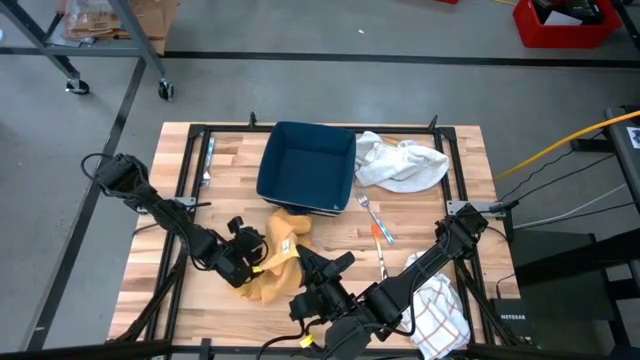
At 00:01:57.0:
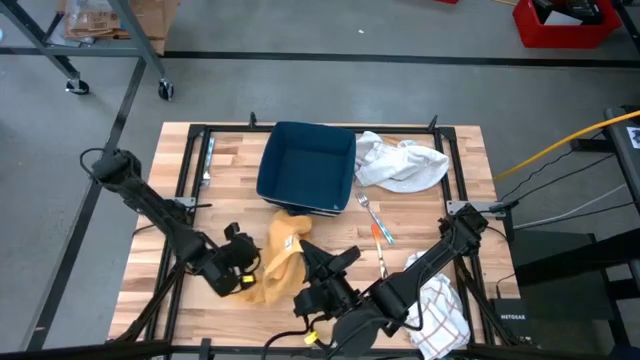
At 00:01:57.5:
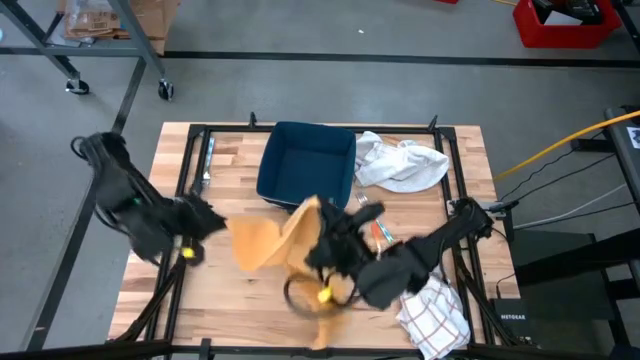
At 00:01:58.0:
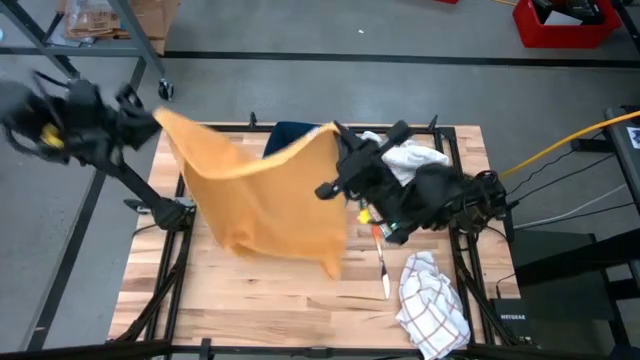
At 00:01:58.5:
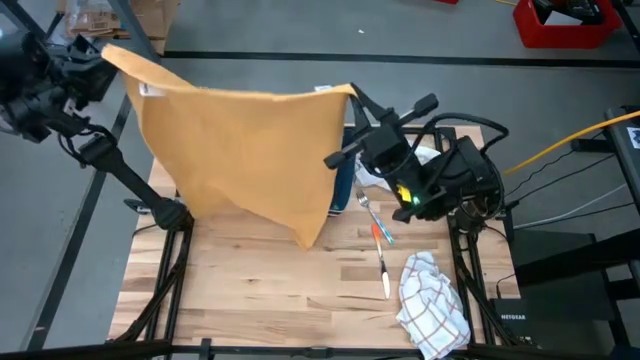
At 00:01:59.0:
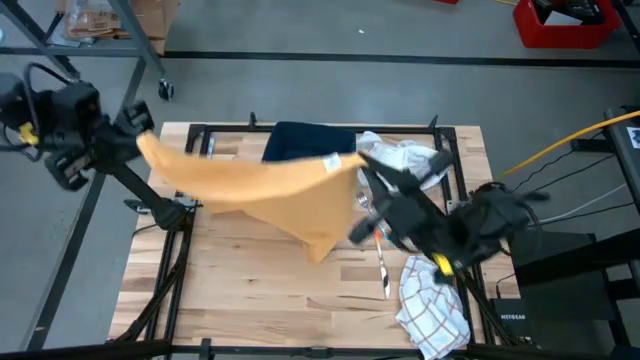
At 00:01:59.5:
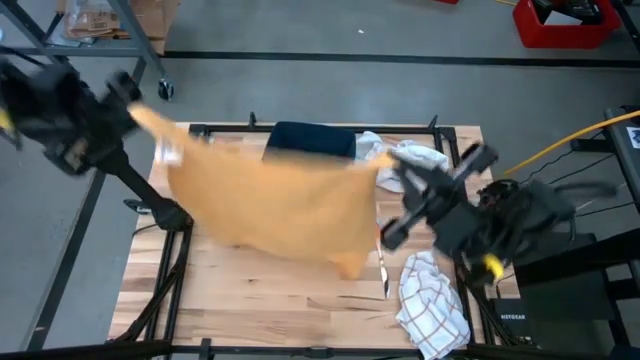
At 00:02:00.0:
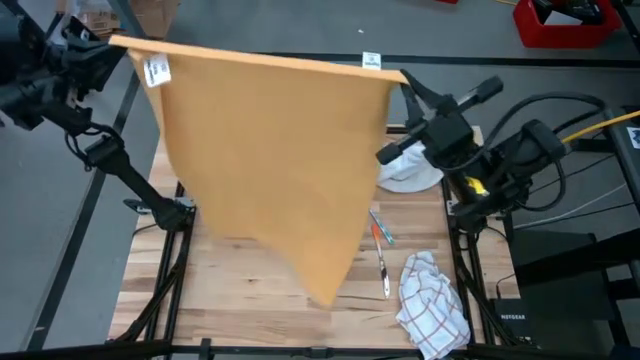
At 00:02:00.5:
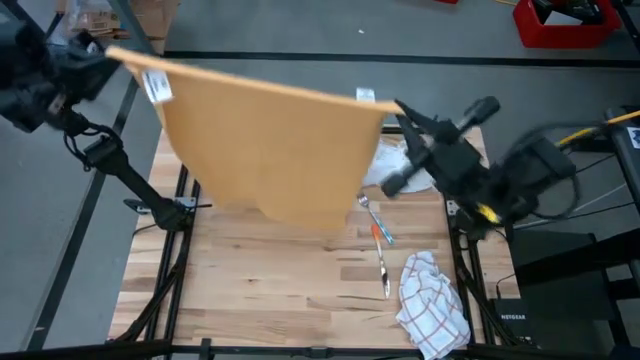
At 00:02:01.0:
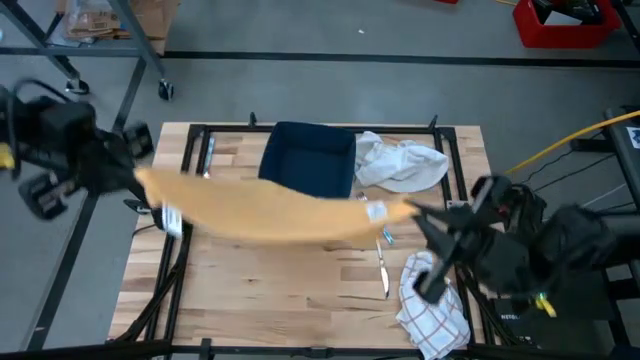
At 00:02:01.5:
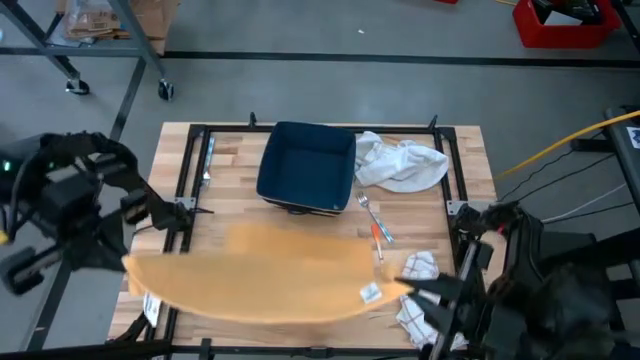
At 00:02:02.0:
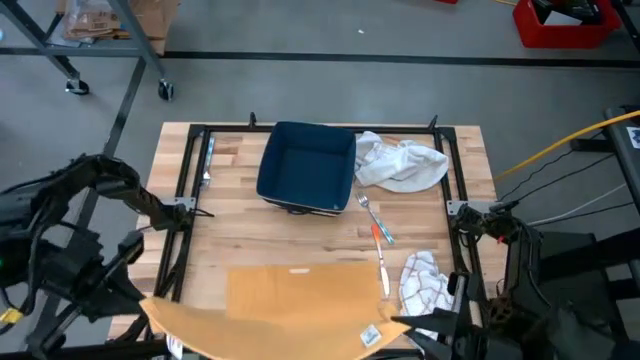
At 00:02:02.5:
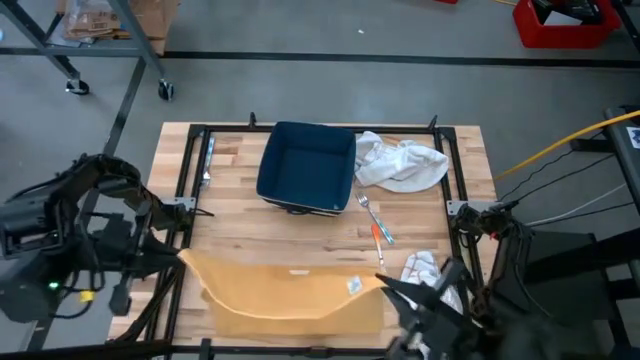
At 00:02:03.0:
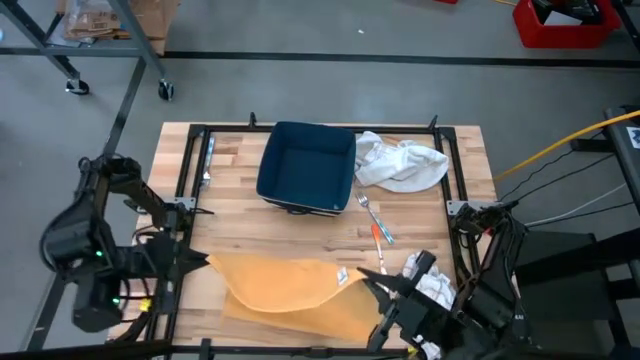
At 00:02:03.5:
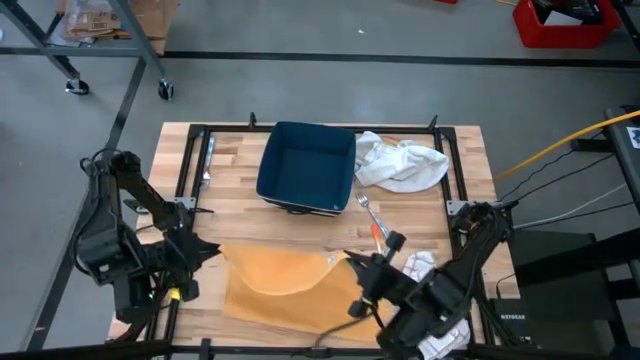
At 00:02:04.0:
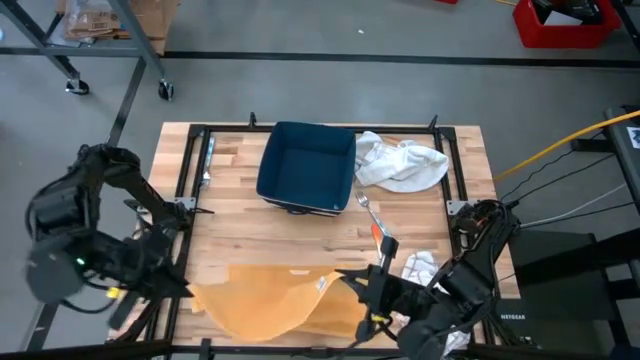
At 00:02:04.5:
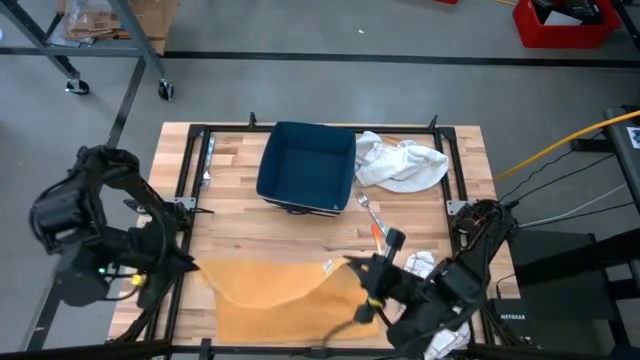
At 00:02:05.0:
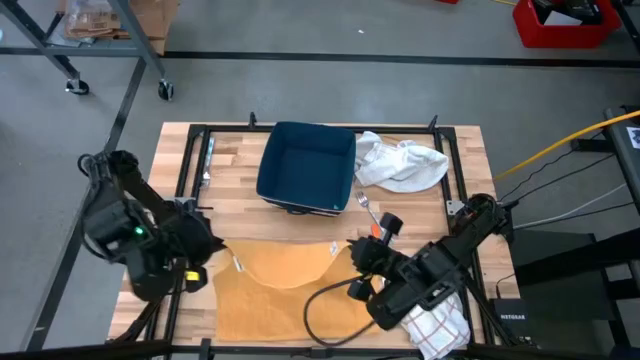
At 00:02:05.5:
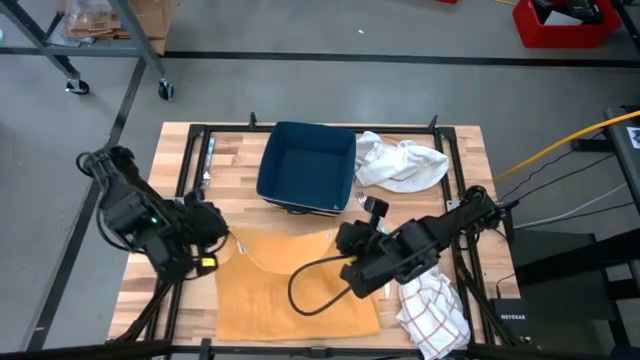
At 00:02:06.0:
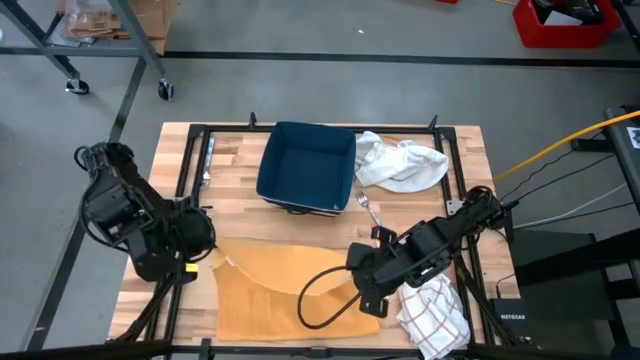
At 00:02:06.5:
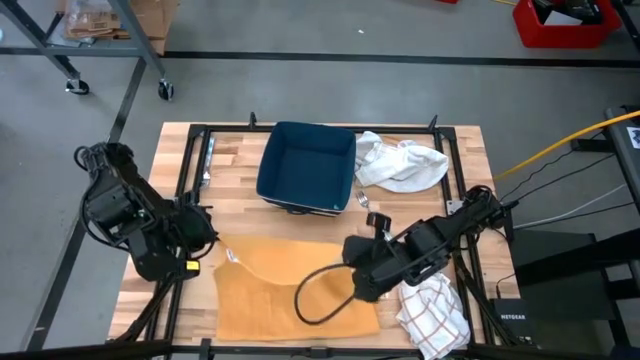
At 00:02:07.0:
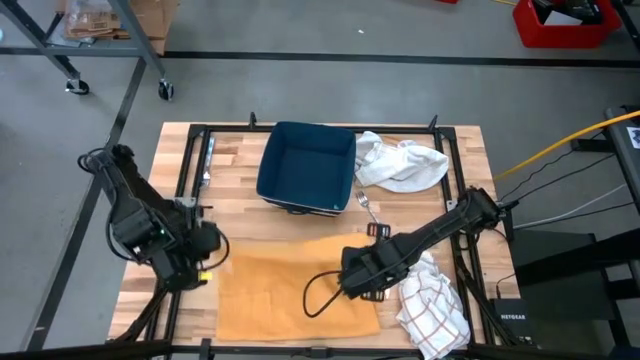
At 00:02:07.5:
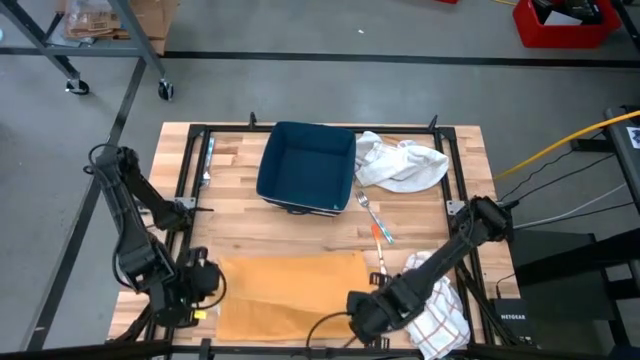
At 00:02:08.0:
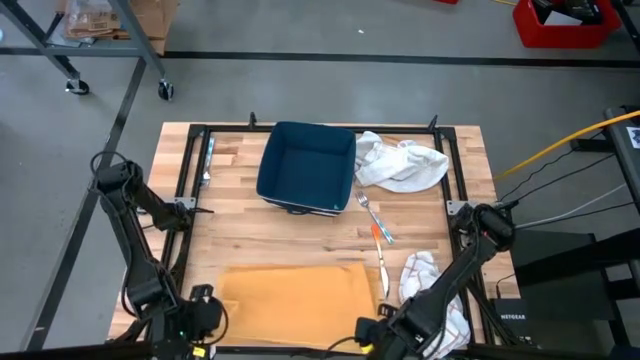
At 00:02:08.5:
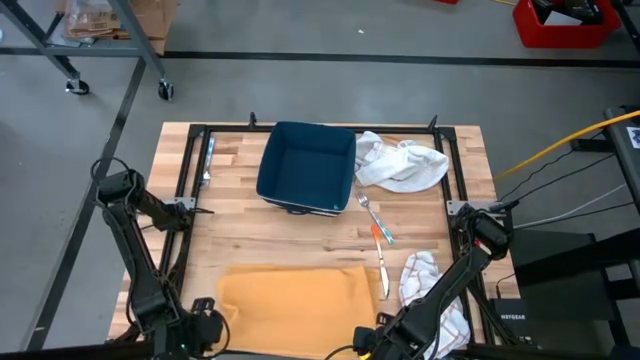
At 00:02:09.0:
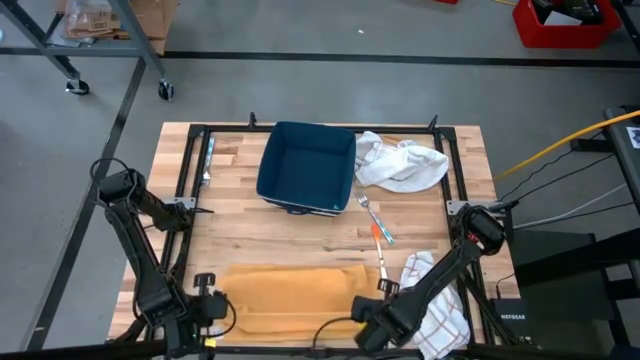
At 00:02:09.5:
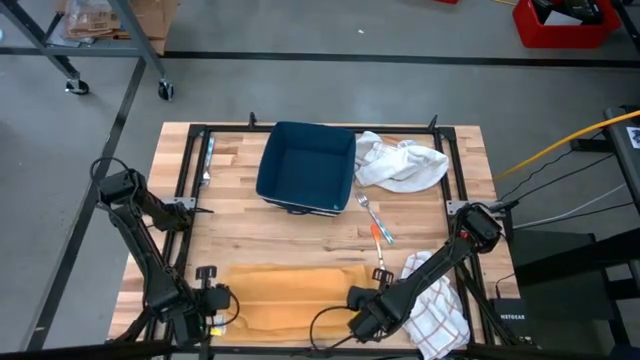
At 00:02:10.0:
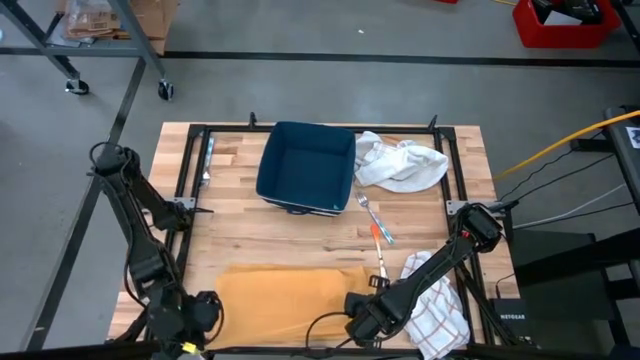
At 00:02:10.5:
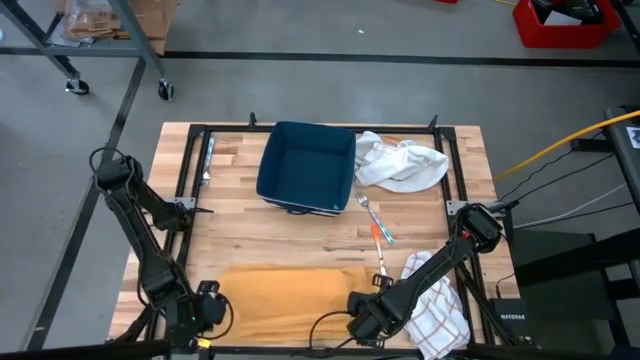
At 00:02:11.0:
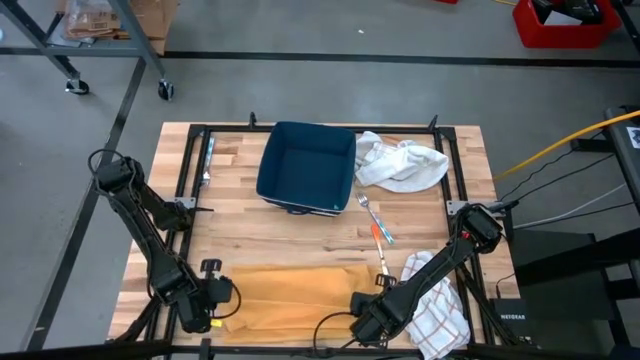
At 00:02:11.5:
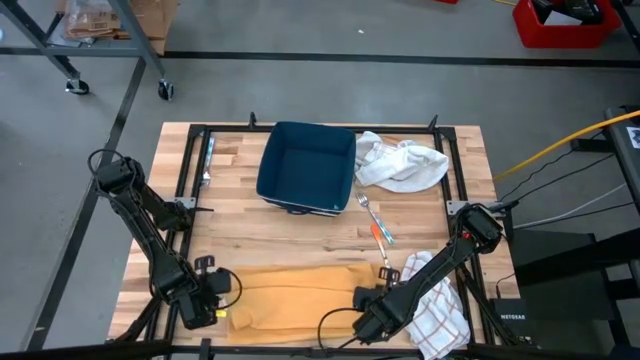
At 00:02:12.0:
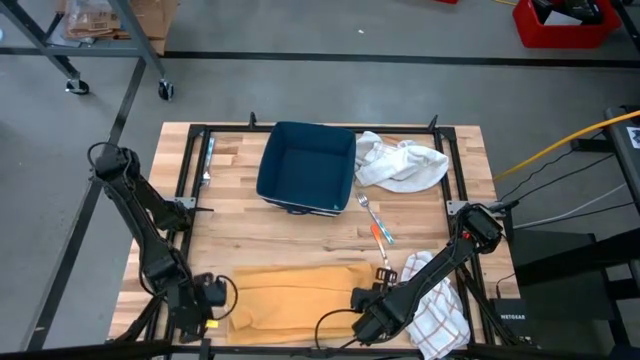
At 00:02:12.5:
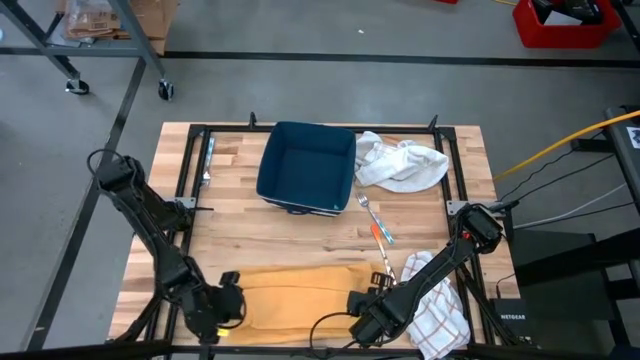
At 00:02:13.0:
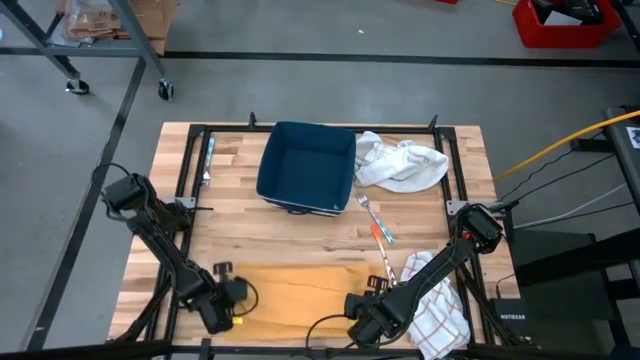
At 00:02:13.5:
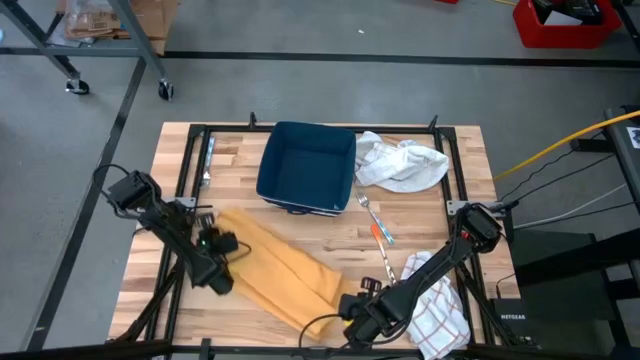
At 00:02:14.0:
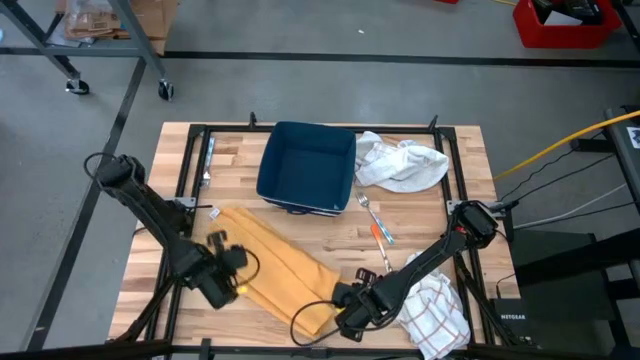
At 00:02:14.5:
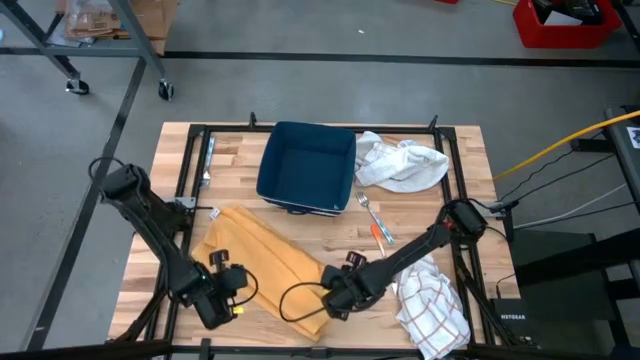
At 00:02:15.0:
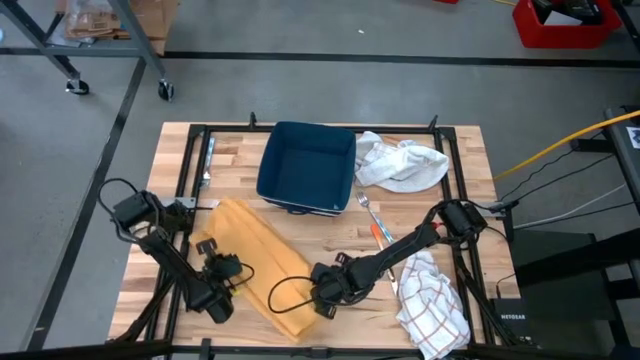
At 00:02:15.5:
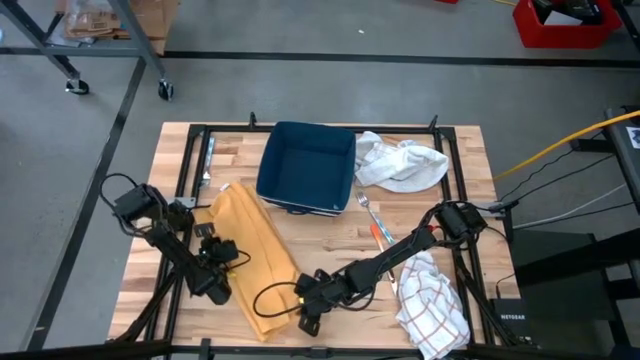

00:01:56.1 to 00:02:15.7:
Task: Fold towel
Fold the yellow towel

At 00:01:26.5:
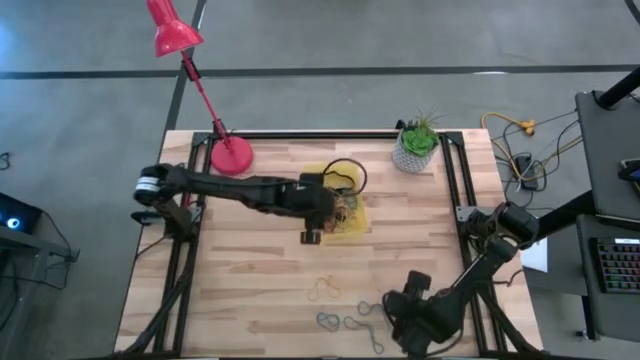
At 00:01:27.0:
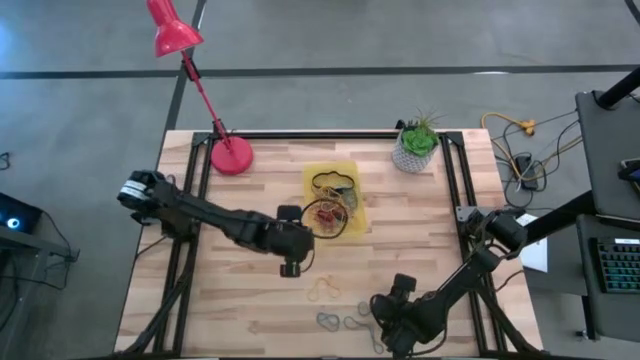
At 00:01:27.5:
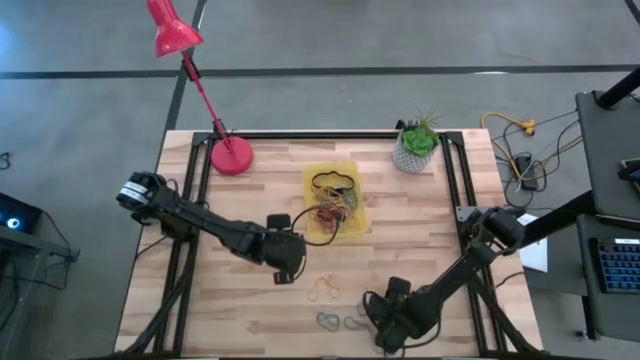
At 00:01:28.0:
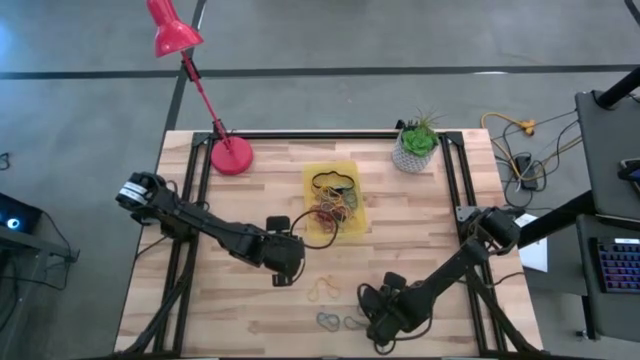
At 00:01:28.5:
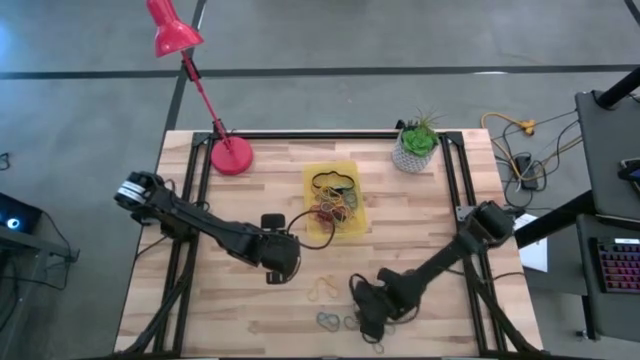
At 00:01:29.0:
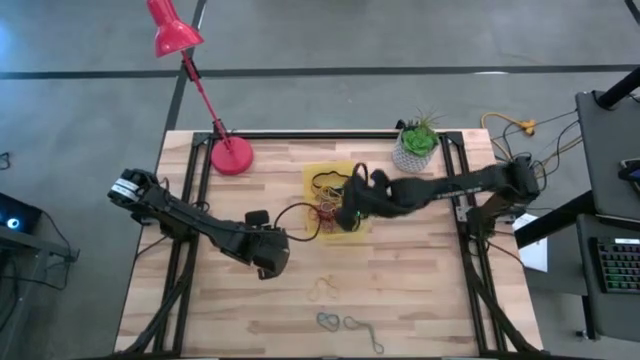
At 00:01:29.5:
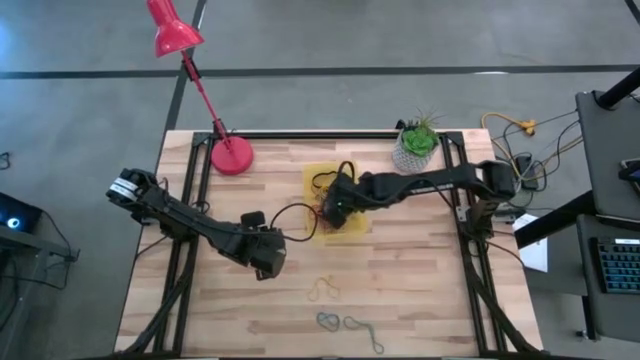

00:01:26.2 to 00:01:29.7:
Task: Pick and place rubber bands into bin
Put the blue rubber band into the yellow bin
